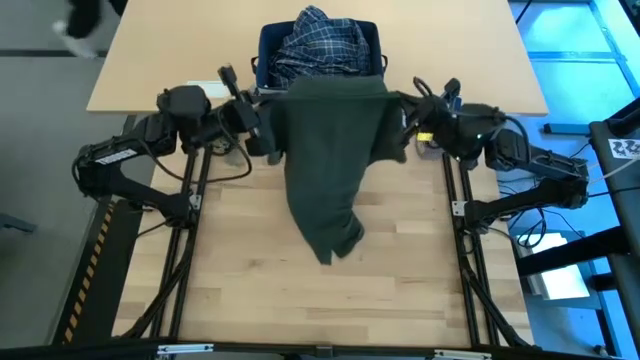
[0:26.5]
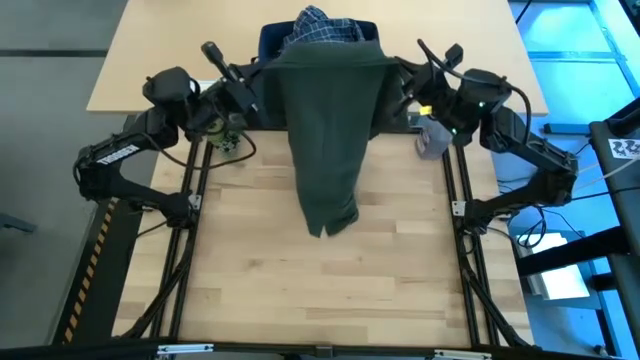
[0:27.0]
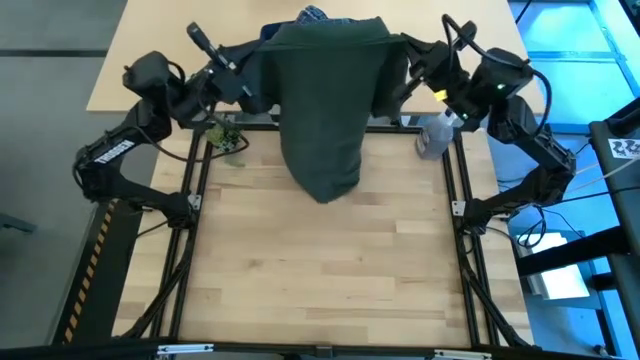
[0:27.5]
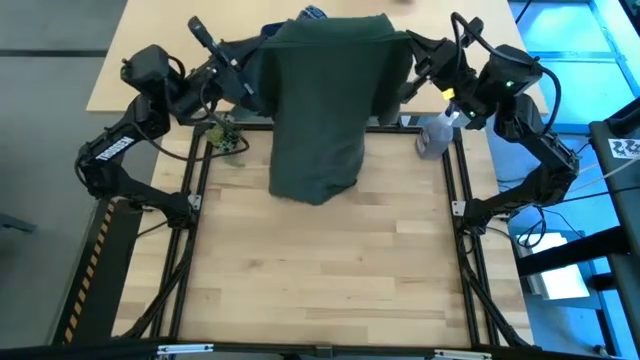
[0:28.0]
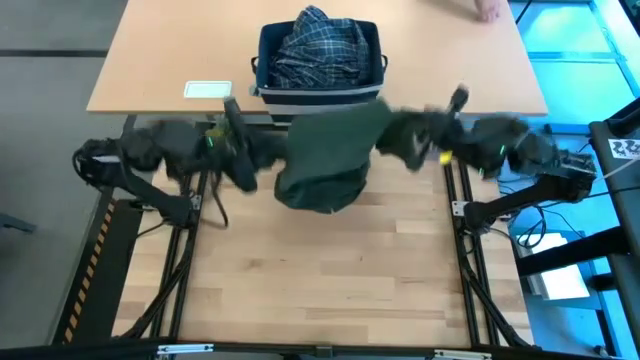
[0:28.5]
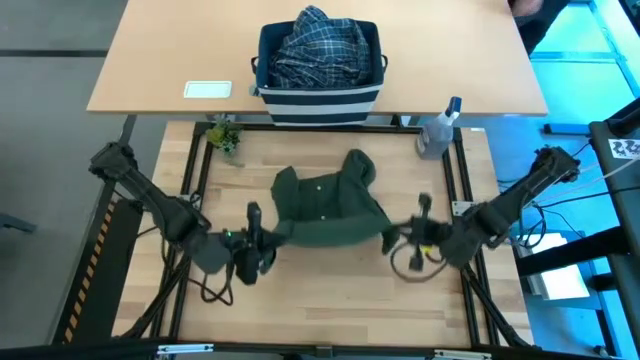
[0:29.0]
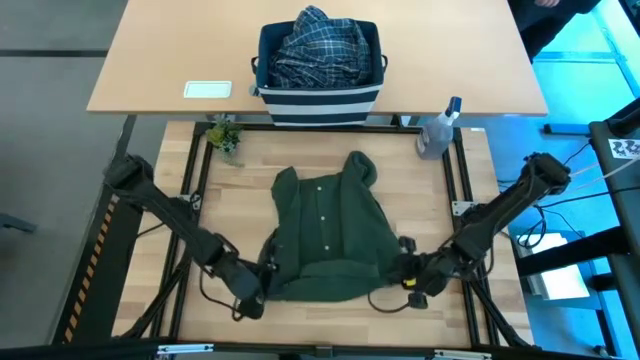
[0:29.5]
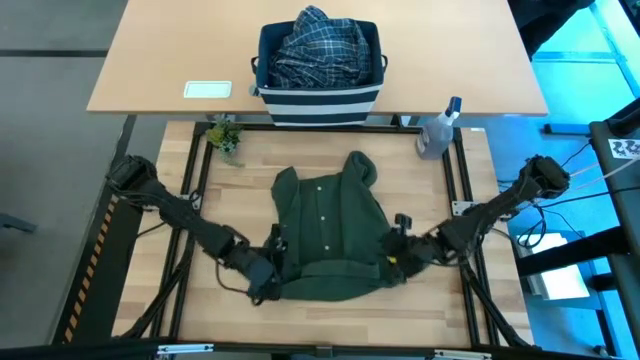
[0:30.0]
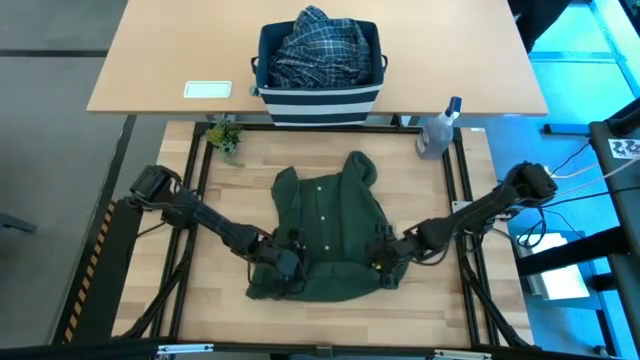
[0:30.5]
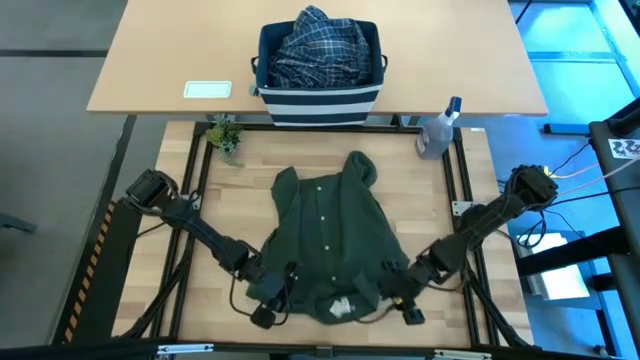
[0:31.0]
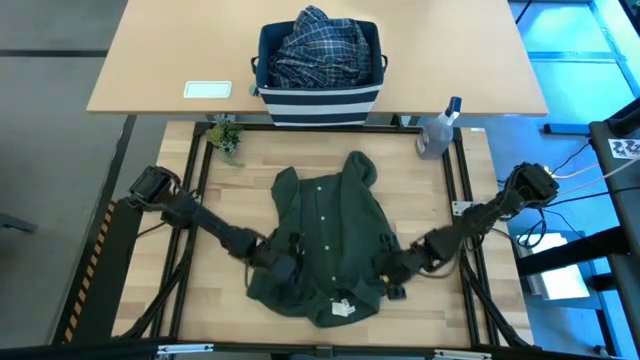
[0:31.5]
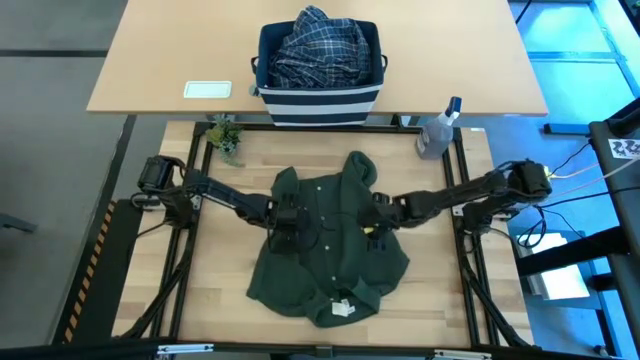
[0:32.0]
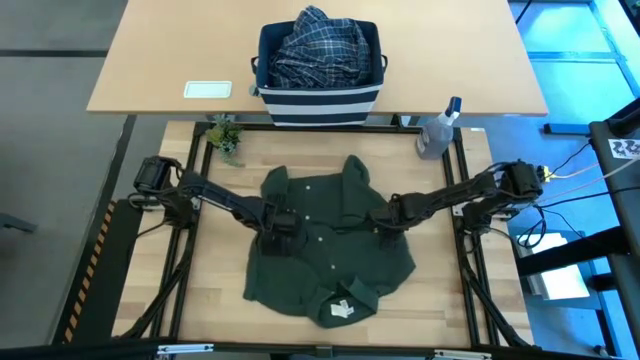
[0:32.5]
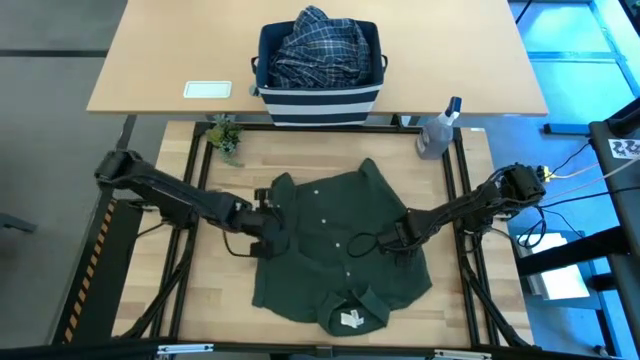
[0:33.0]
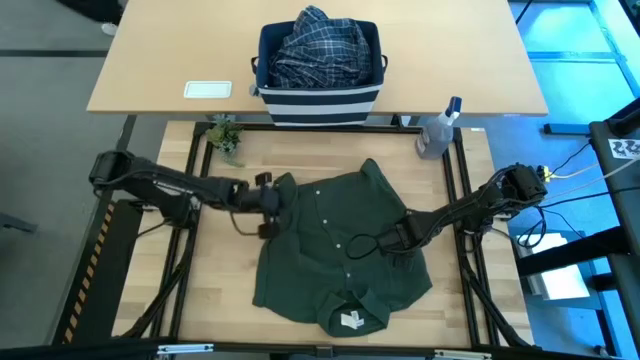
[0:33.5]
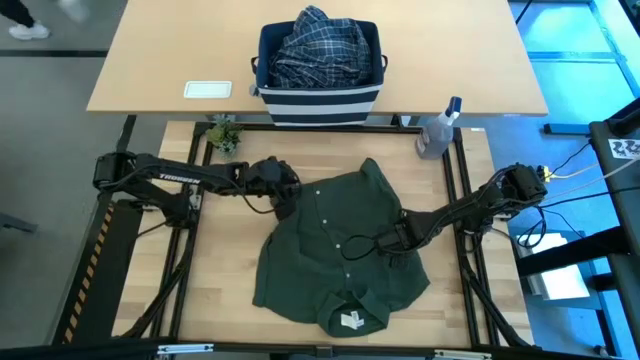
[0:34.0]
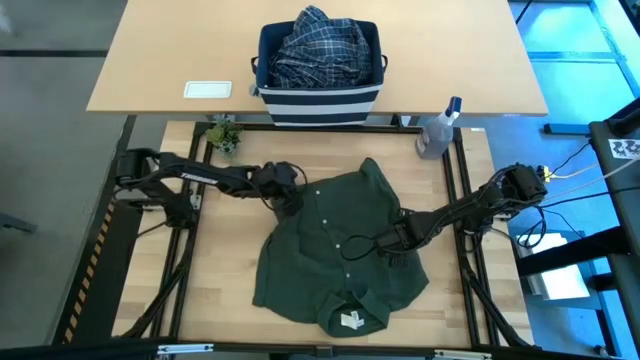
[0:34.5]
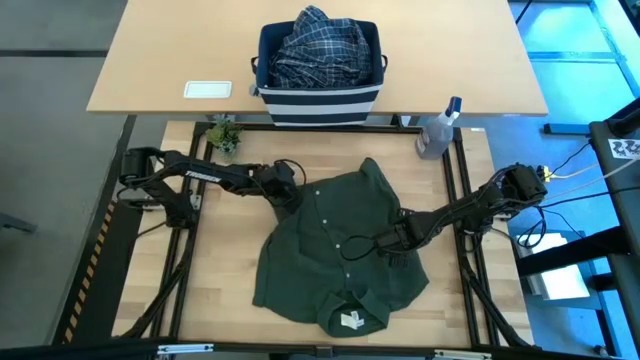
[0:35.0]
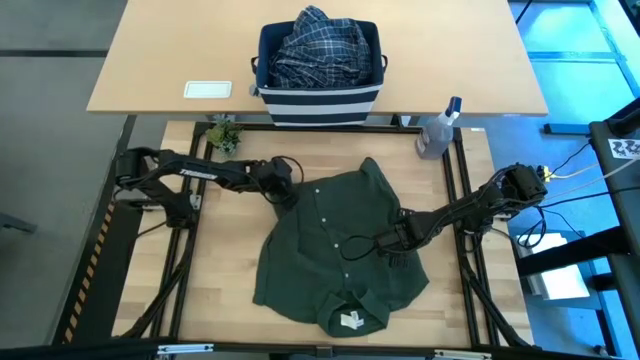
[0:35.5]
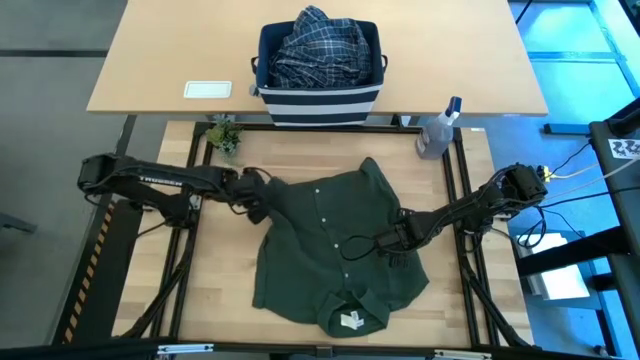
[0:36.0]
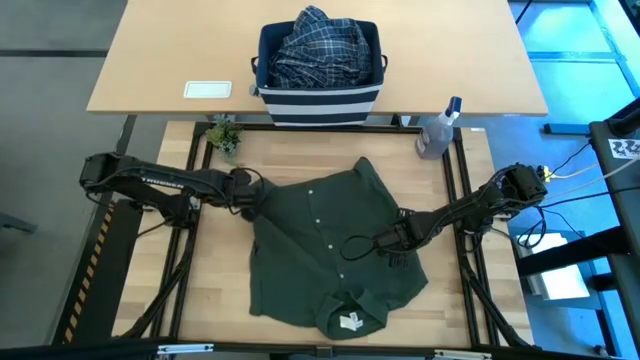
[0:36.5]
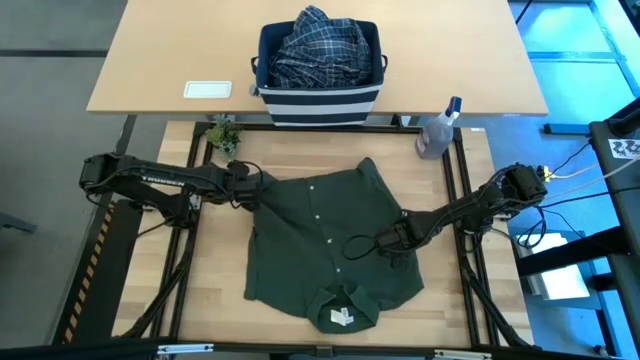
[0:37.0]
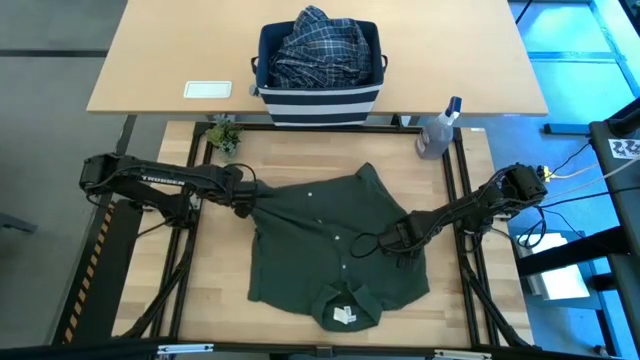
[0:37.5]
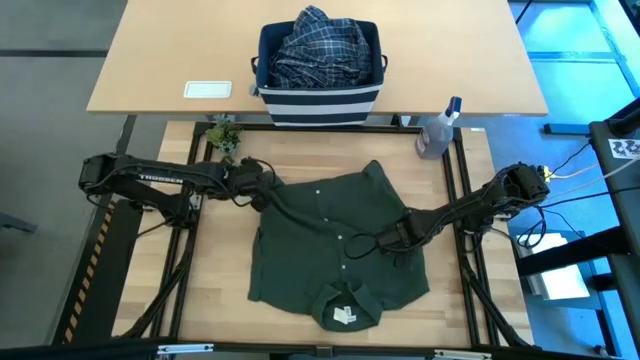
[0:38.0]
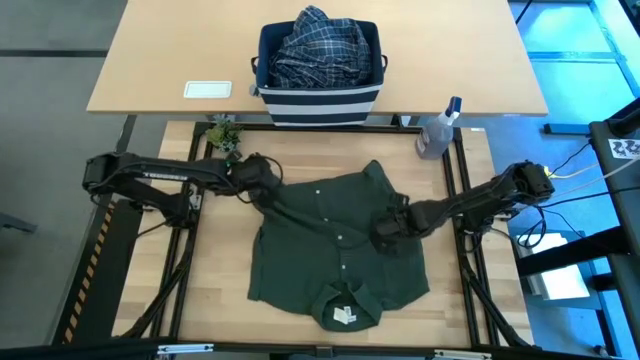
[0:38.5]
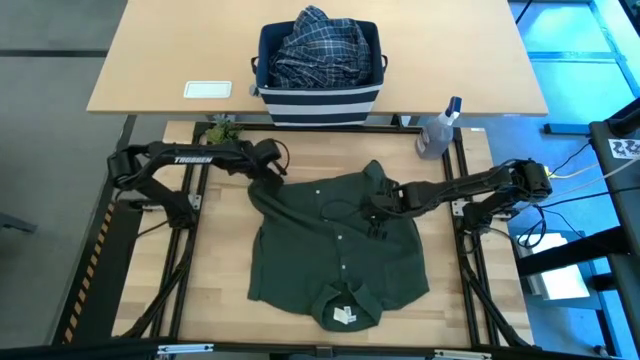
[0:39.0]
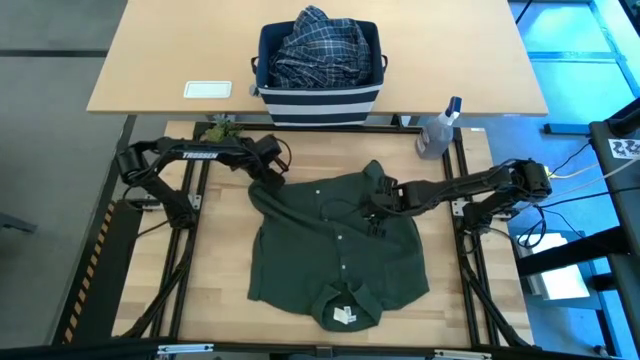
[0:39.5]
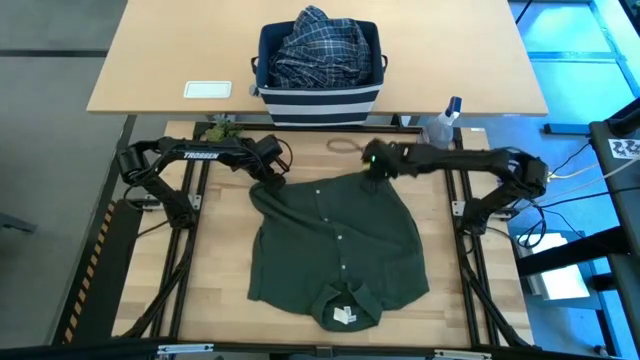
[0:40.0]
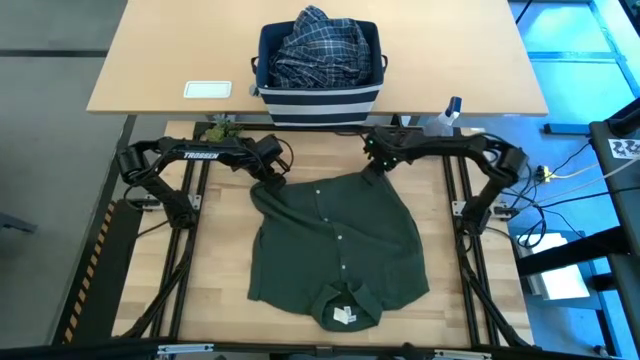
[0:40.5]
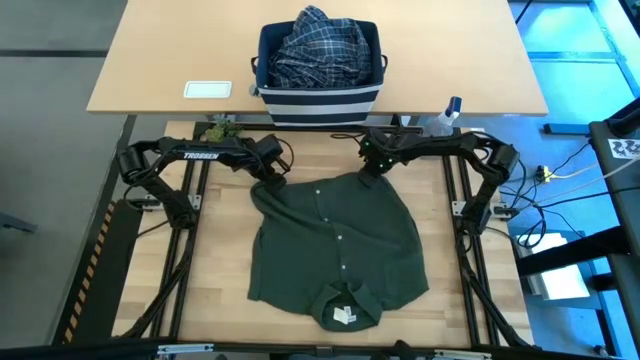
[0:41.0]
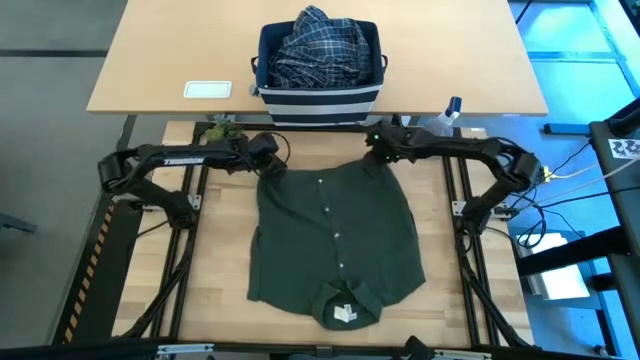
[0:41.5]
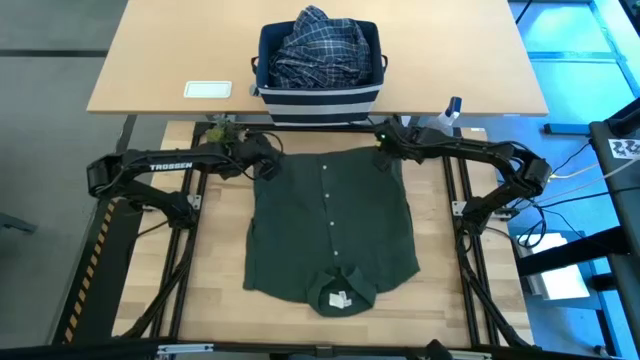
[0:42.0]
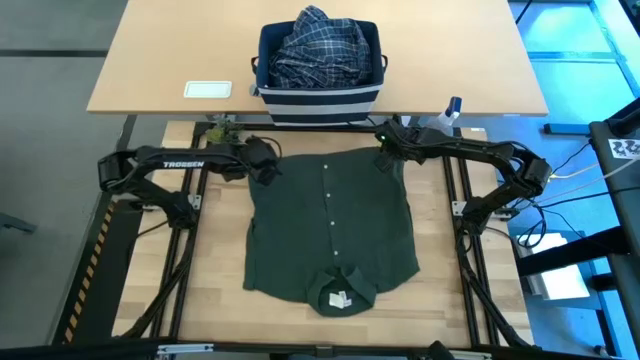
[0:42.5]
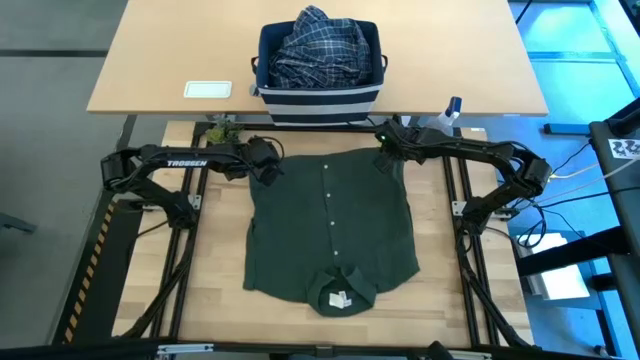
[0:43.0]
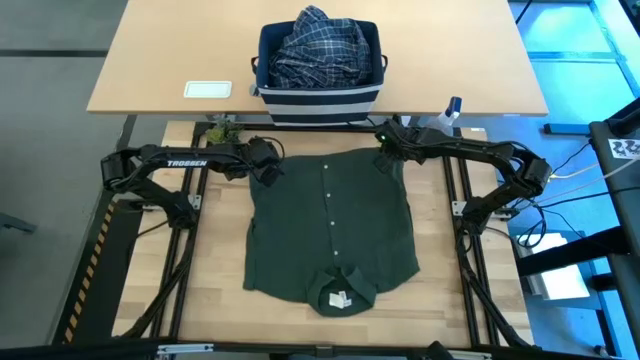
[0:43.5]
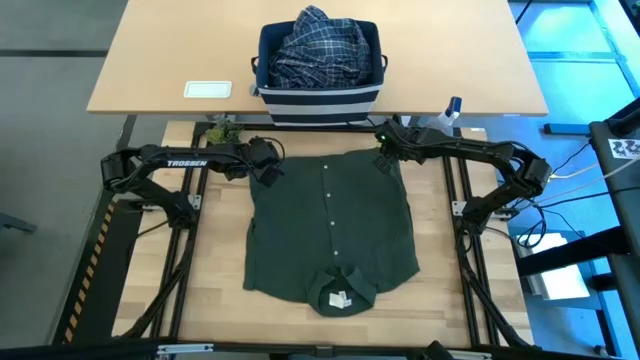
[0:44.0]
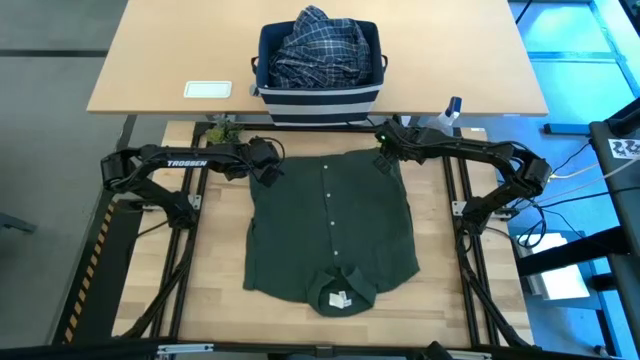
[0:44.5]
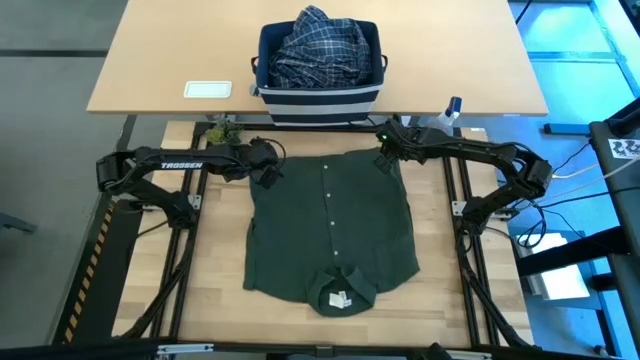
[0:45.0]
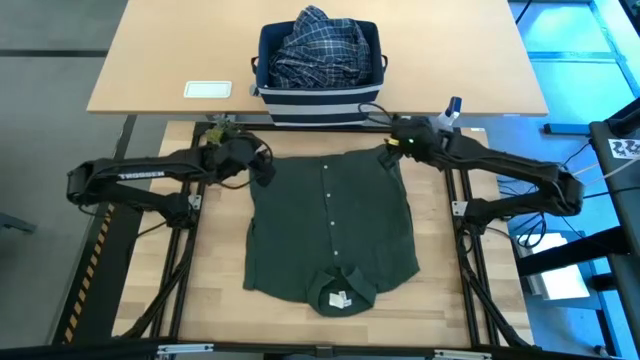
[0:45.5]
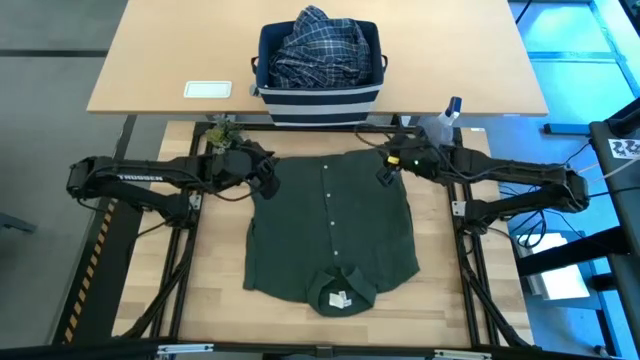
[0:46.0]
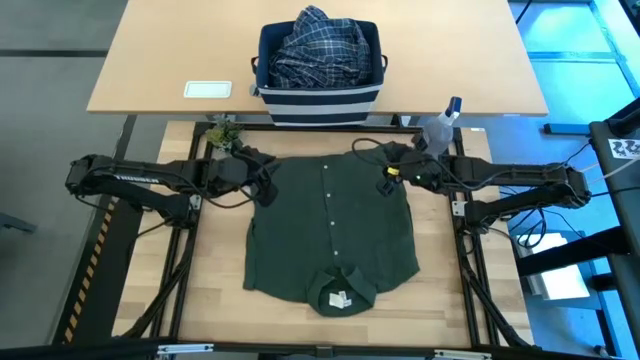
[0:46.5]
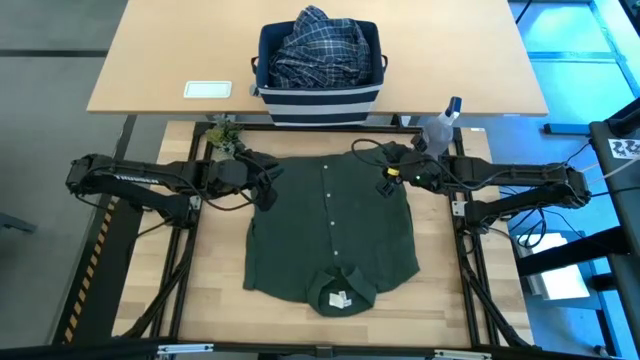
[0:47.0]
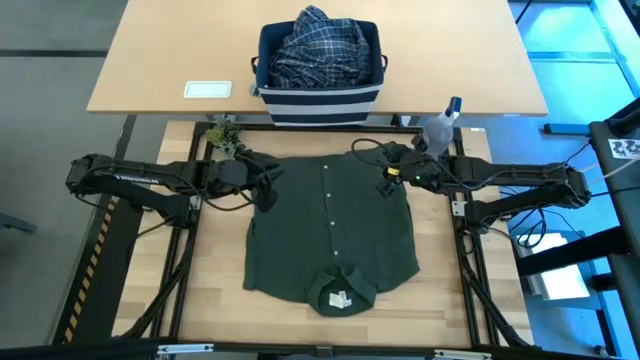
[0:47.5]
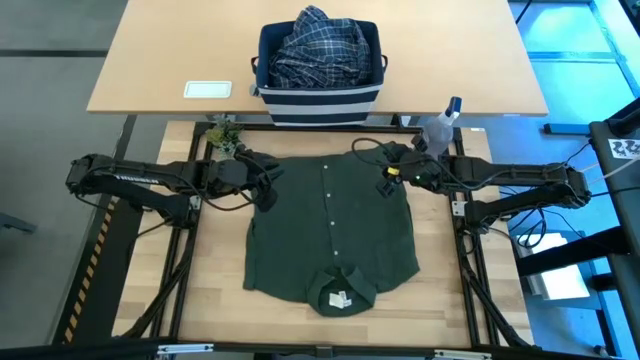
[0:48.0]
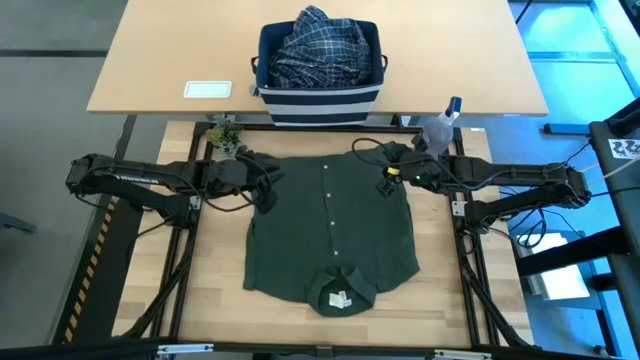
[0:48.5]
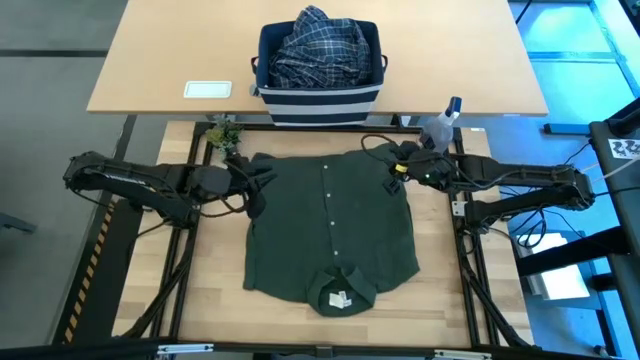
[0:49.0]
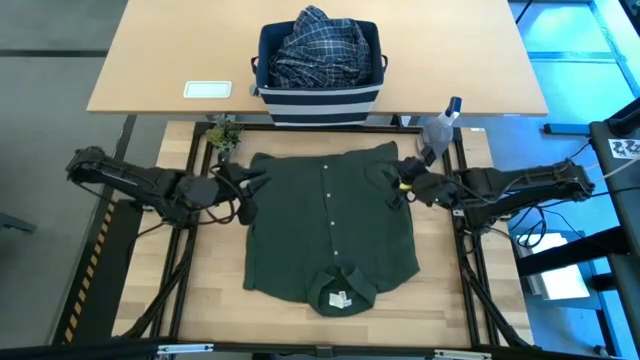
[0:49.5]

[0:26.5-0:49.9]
Task: Fold Laundry from Bin
Fold the green polo shirt
